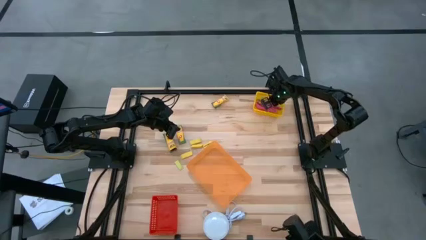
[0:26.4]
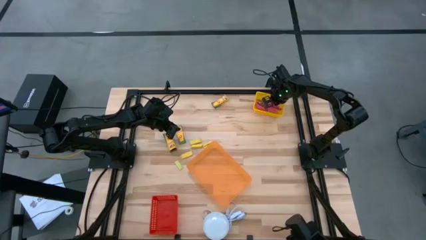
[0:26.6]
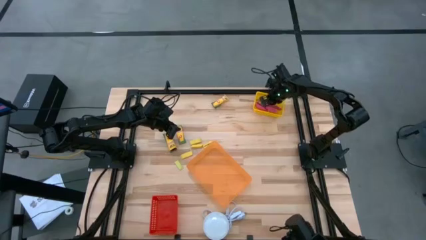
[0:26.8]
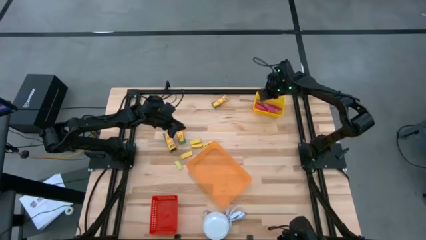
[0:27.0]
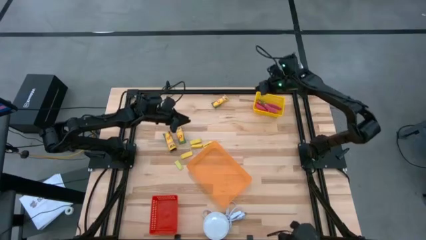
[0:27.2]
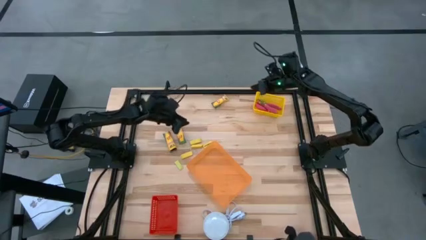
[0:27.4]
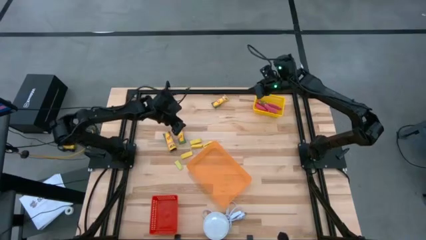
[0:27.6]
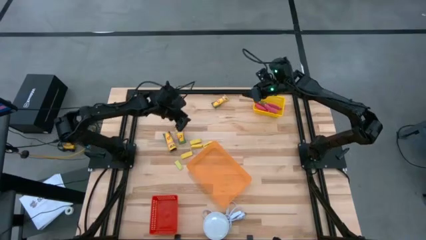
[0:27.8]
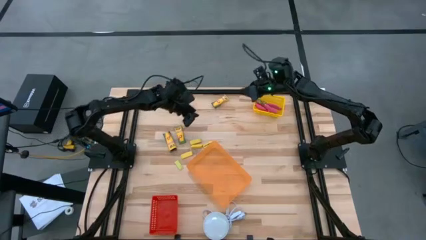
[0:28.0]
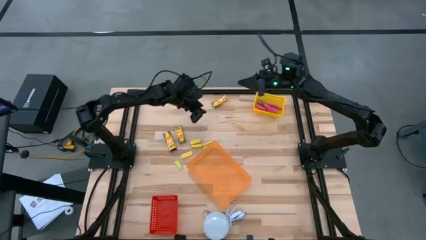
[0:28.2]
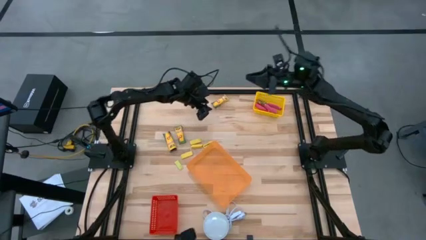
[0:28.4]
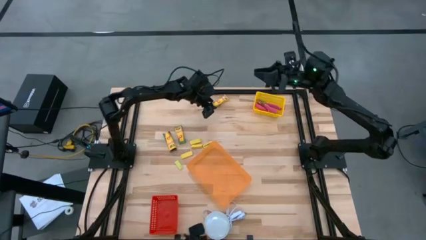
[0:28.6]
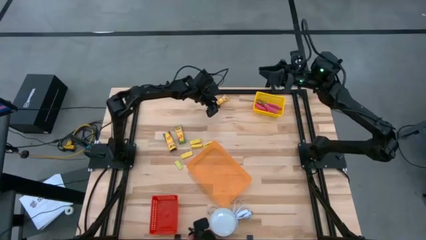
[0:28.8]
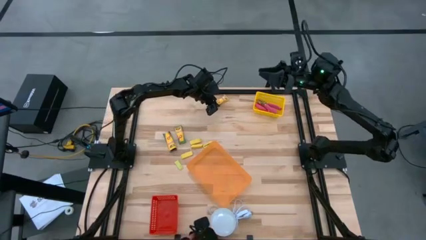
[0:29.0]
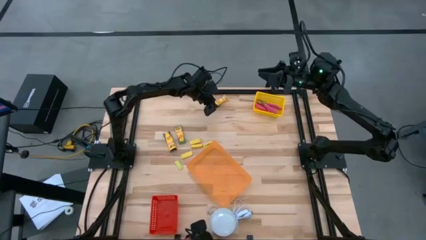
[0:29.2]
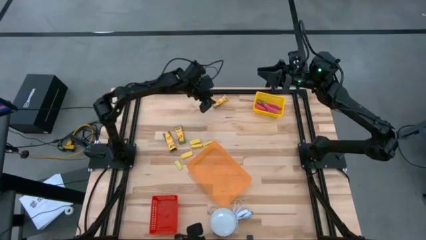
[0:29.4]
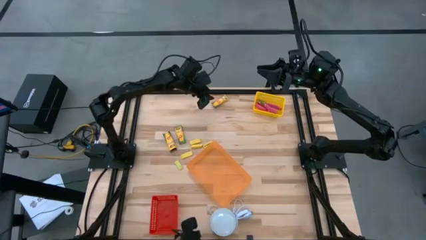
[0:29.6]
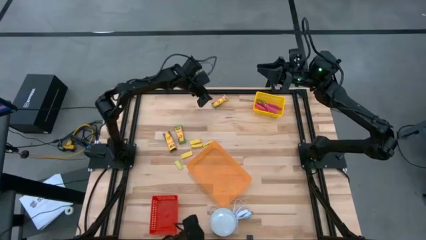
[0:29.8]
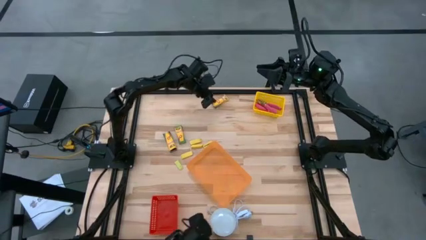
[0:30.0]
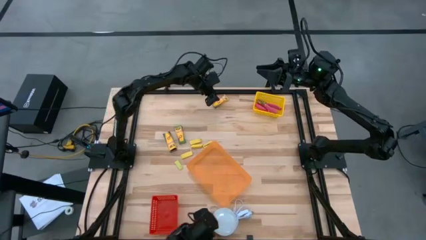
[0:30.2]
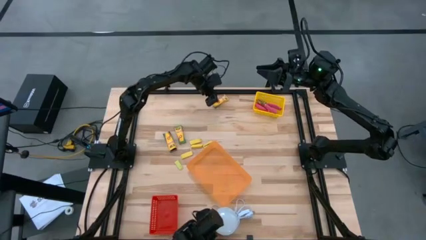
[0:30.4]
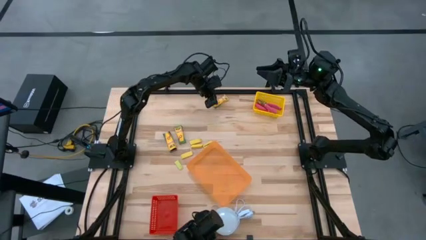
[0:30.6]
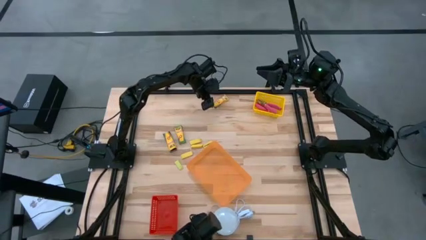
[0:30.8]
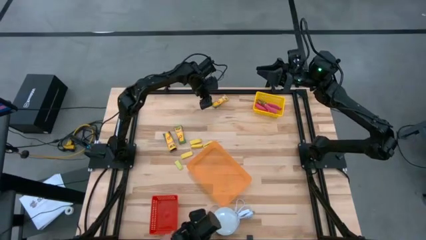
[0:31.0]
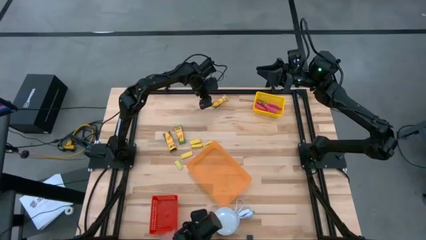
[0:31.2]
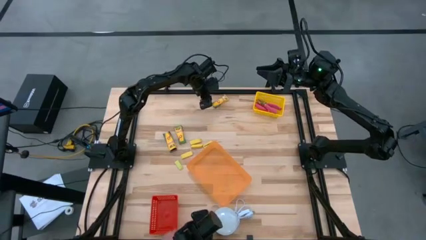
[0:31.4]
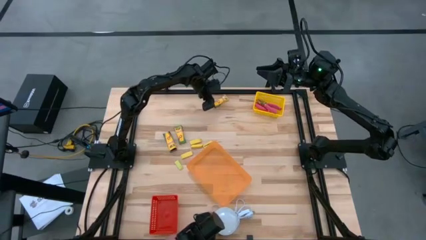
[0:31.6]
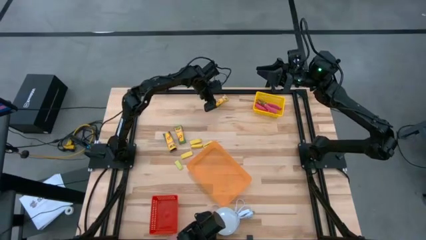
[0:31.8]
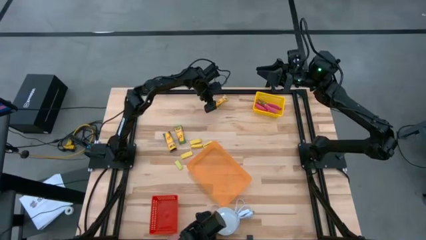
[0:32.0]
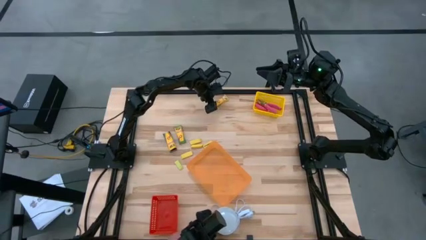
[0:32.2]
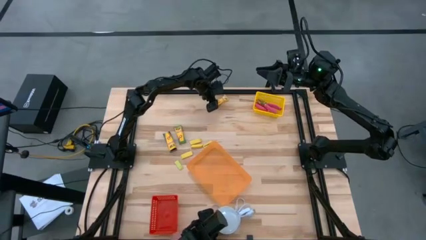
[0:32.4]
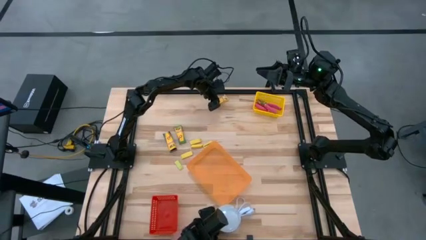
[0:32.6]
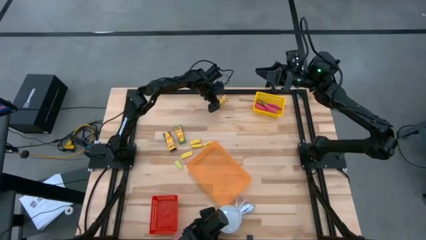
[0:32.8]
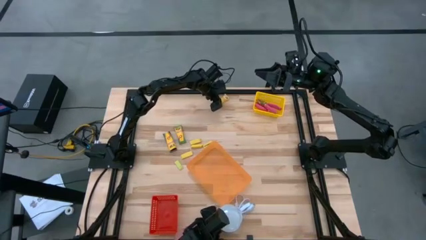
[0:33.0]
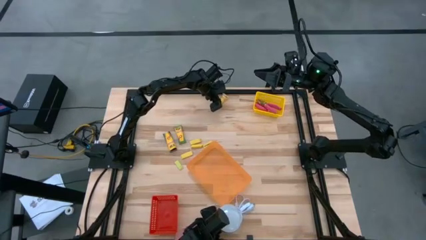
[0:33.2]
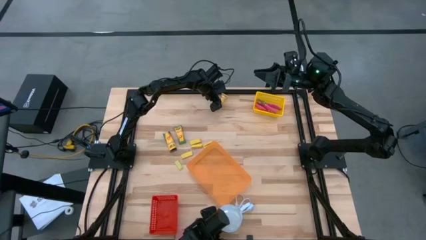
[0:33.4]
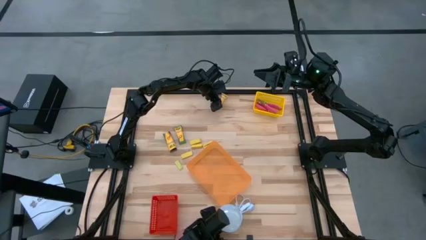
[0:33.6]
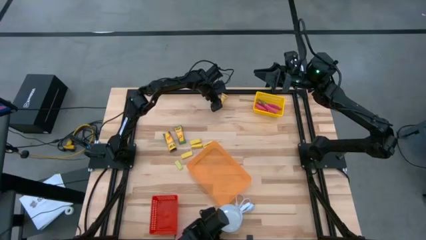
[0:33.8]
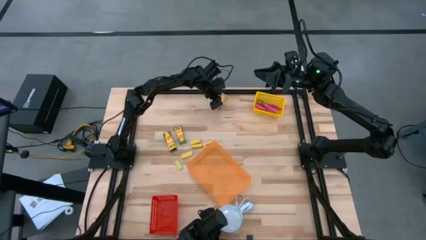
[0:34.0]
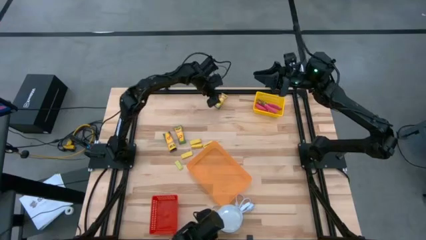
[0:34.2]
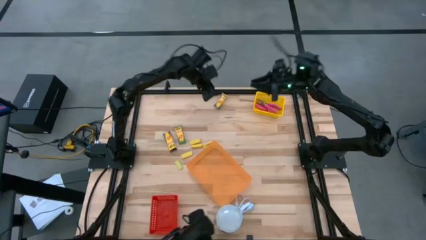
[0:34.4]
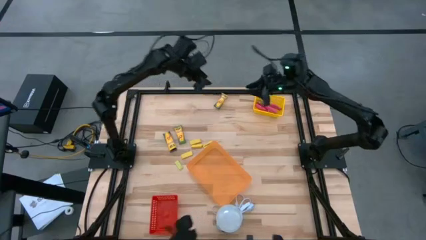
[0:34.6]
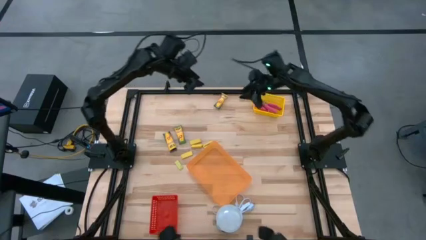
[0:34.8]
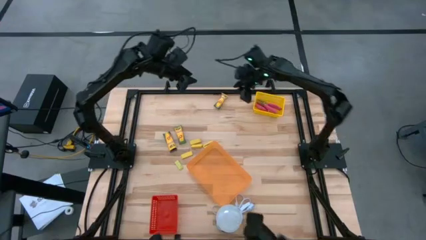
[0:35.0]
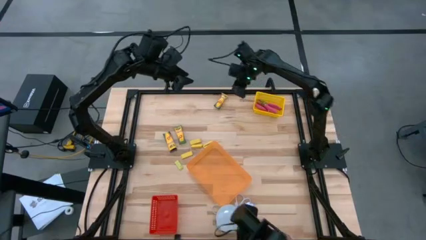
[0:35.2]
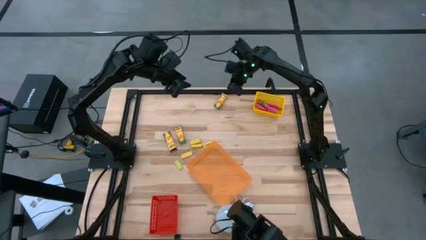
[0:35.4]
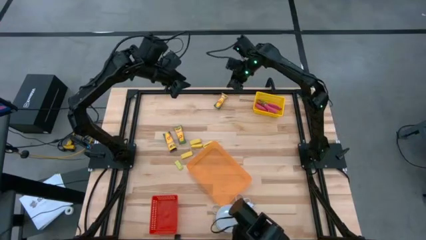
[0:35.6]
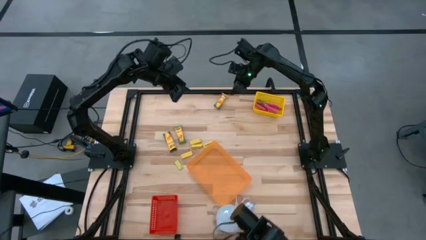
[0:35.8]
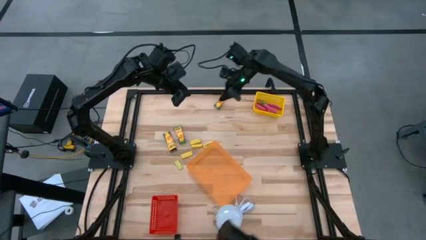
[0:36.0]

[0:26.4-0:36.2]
Task: Pick & Place School Supplies
Put the crayon pack into the orange bin
